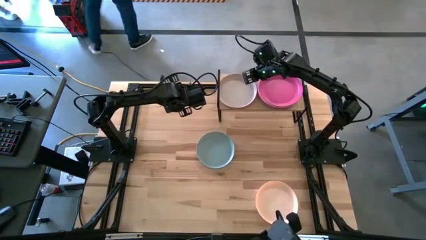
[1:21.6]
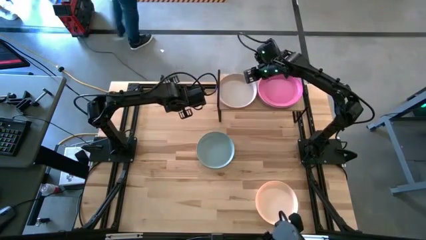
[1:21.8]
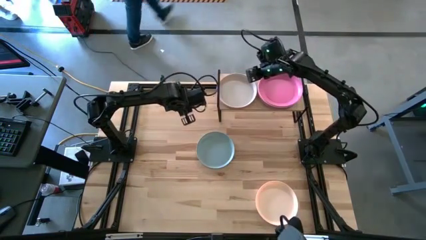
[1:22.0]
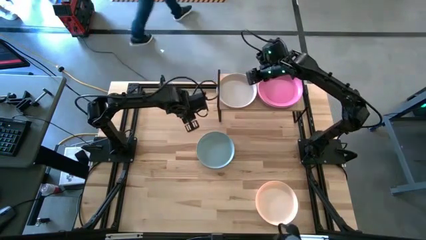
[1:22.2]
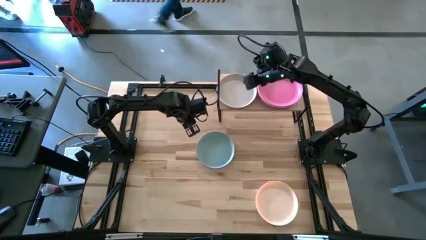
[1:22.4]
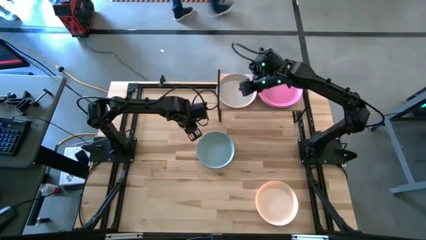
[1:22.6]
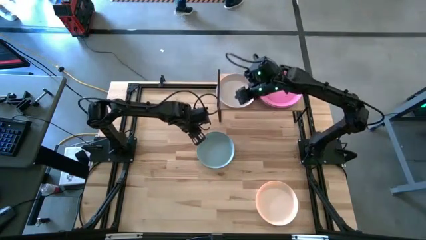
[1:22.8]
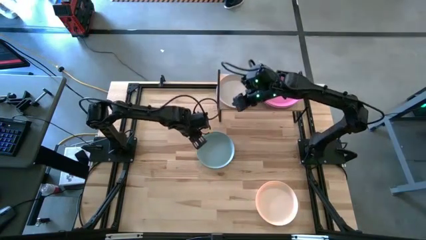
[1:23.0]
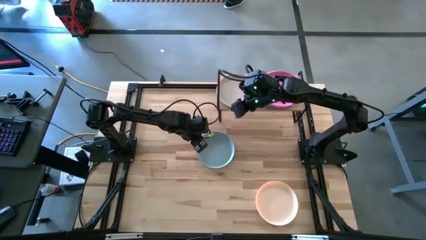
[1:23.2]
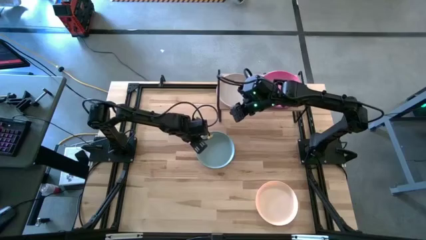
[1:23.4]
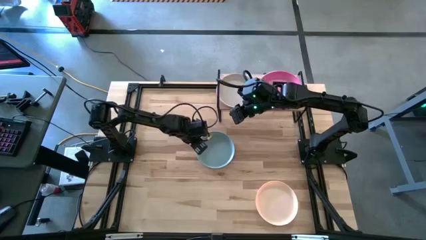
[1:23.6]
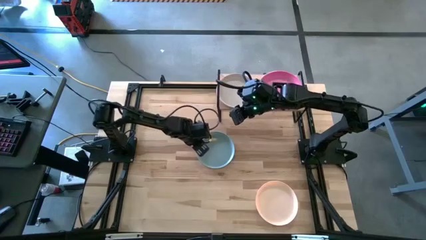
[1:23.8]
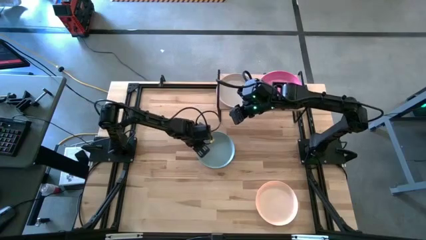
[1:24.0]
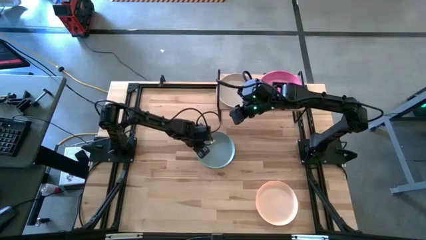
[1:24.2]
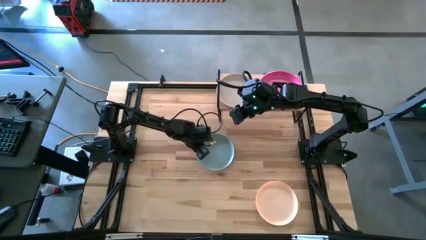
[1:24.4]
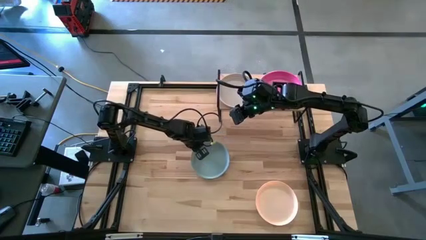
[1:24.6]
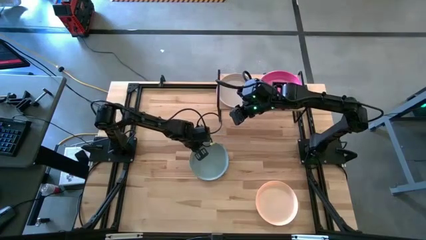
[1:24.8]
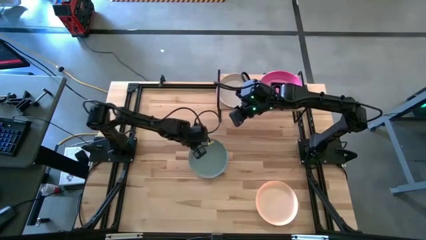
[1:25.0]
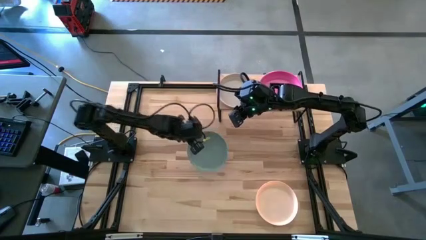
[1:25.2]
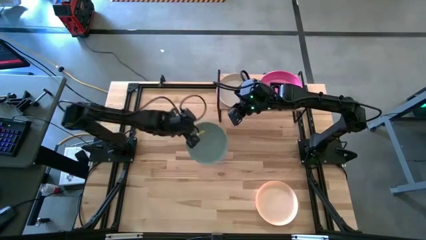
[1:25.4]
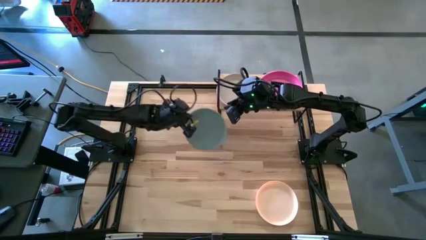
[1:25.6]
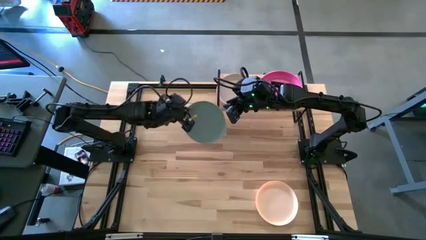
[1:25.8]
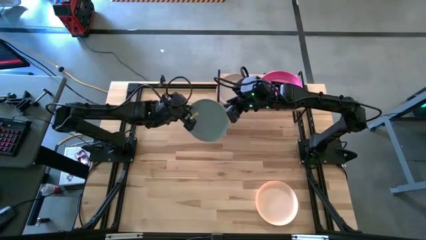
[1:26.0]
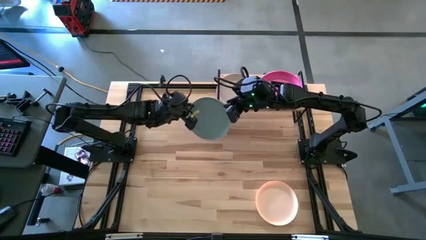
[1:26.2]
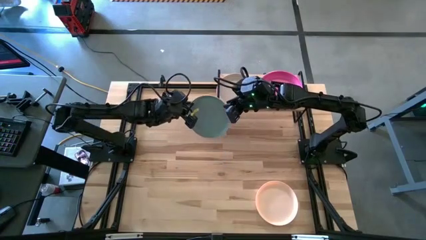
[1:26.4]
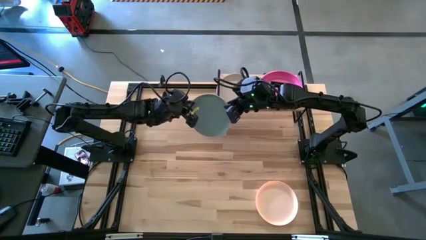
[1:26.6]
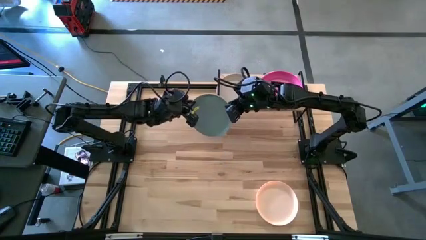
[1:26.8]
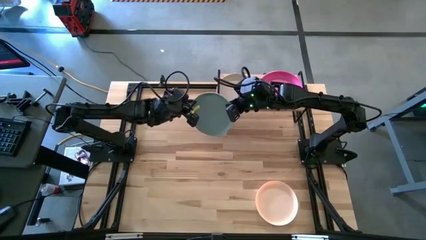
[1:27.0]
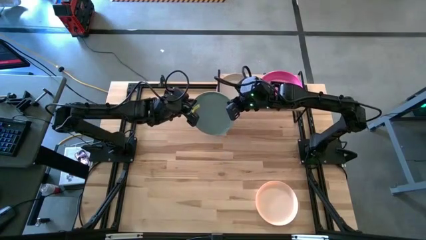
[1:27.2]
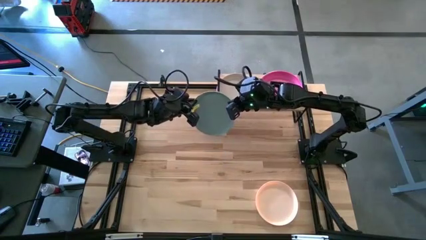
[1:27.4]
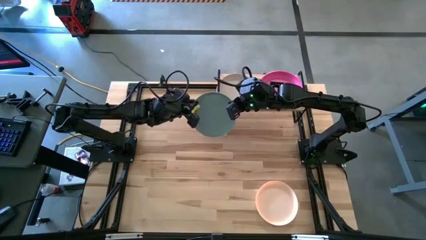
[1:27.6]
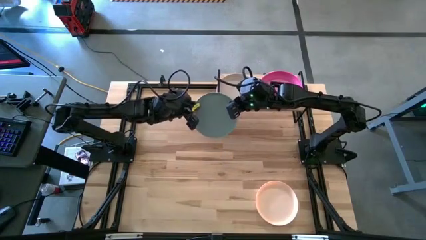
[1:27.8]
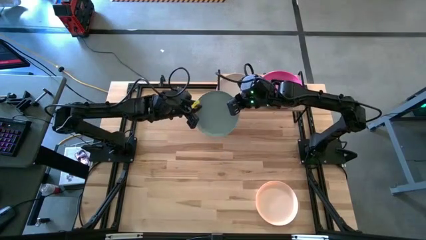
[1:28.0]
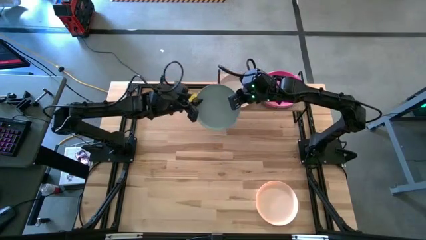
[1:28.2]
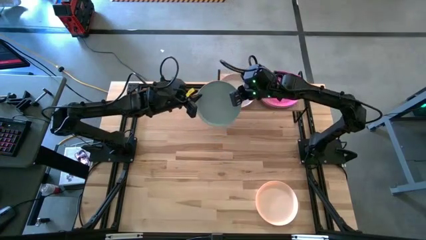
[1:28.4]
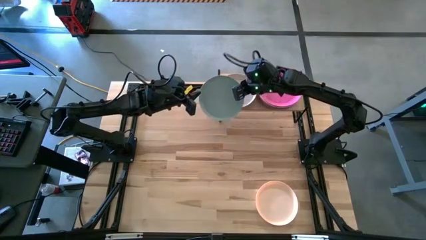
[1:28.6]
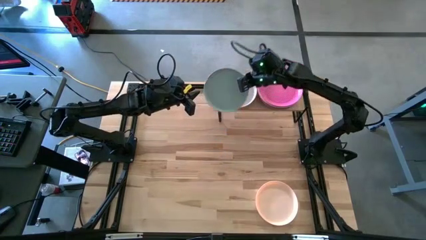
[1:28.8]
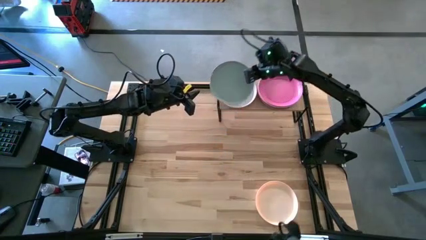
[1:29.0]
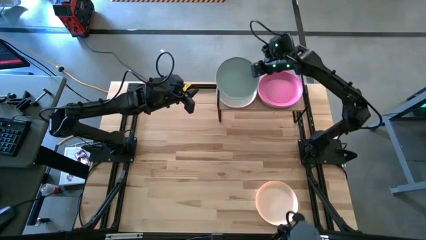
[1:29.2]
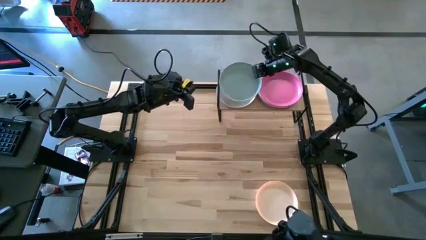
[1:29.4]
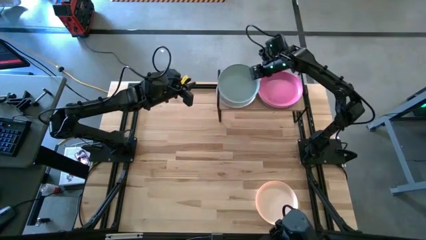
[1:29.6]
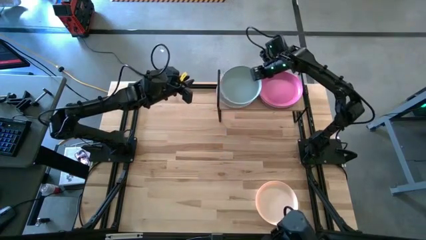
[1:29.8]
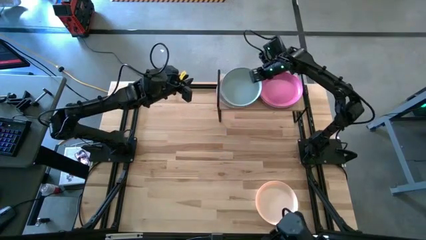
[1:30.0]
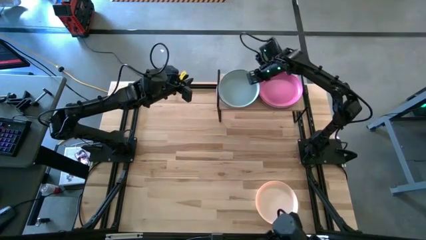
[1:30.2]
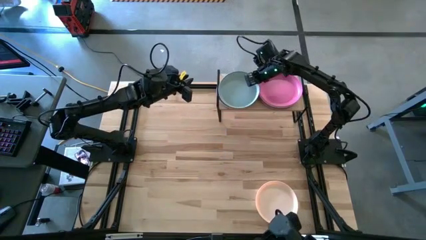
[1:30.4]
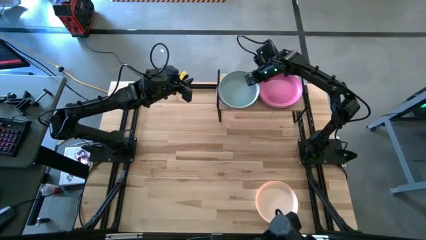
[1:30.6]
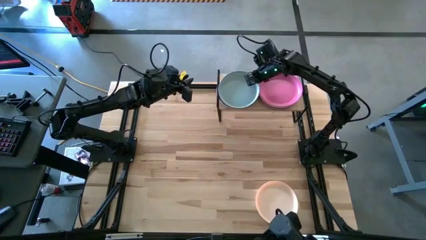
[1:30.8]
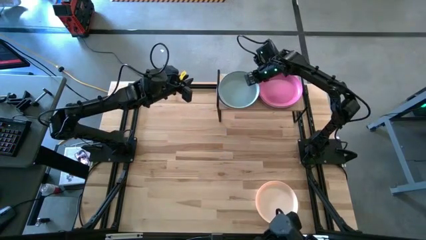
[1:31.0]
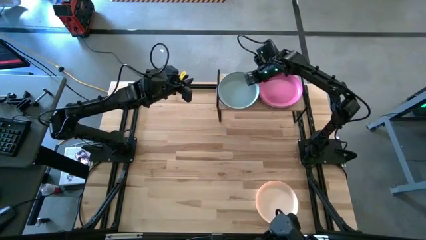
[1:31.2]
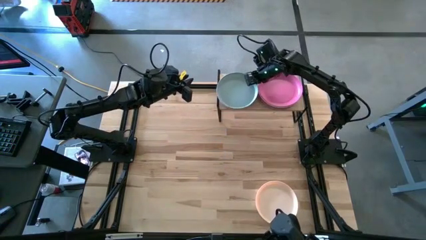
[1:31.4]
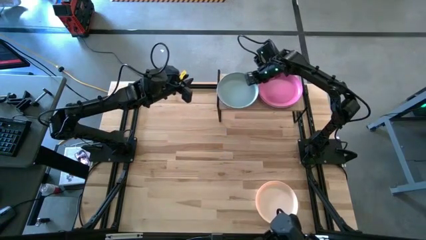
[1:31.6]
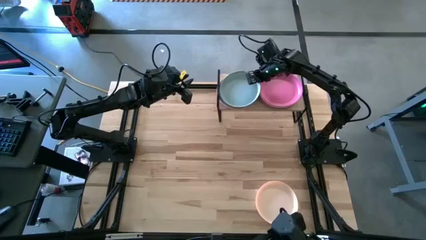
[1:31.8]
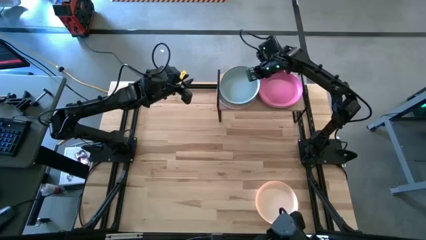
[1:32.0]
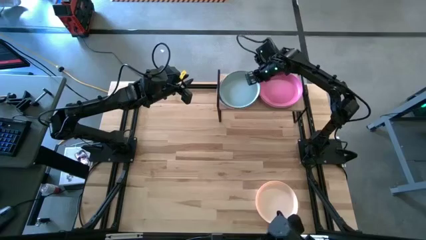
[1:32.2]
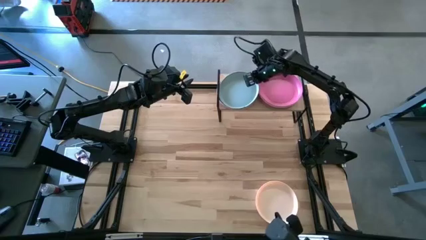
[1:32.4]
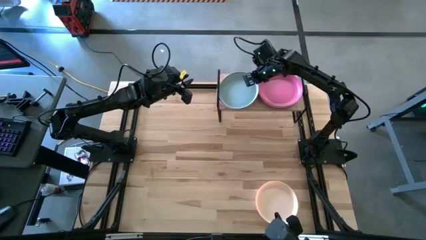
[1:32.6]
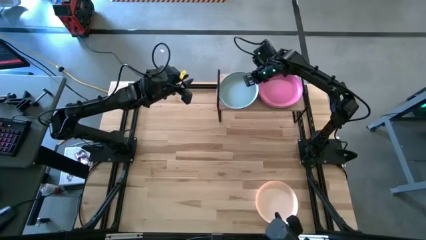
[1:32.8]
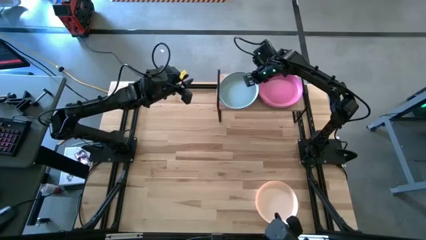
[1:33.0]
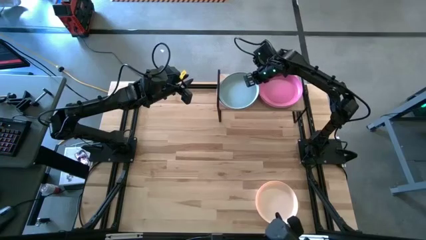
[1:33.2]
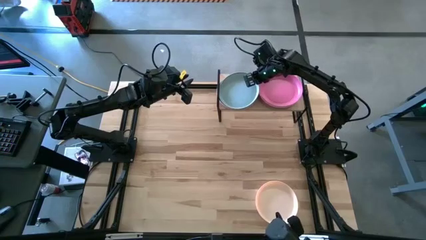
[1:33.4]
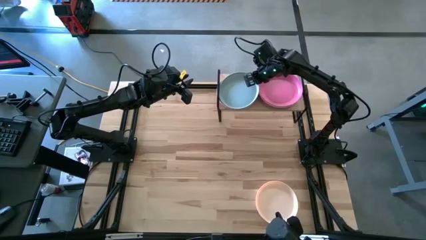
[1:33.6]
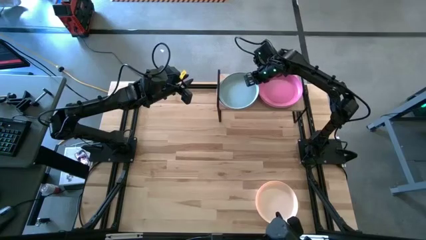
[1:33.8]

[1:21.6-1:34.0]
Task: Place and stack plates onto a shelf
Stack the blue plate on the gray plate on the shelf
